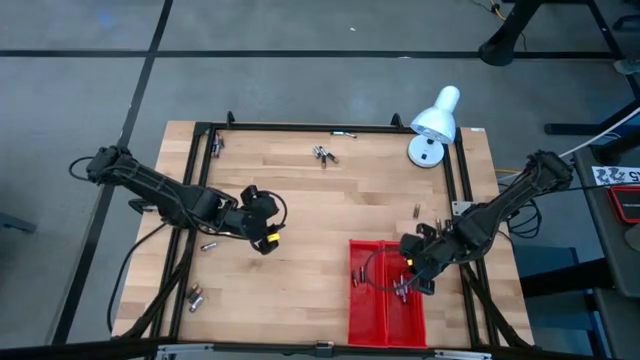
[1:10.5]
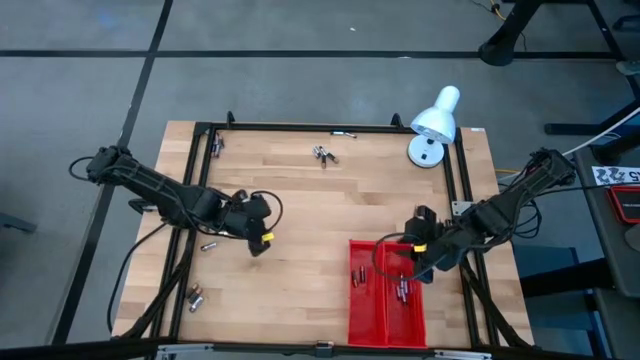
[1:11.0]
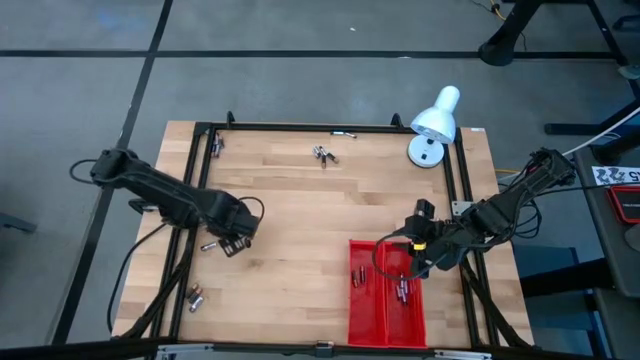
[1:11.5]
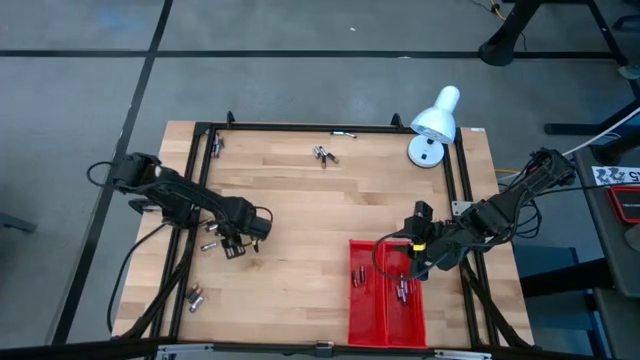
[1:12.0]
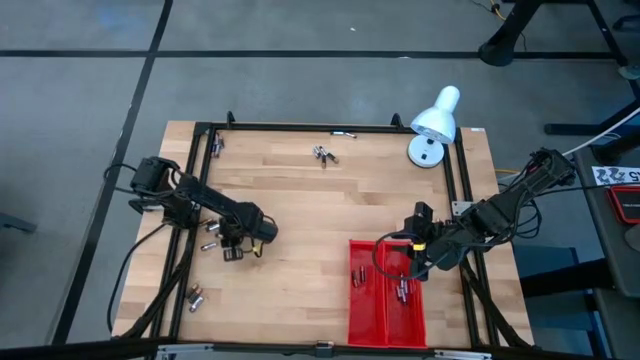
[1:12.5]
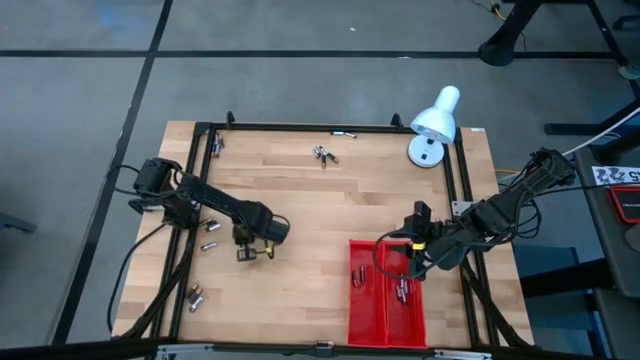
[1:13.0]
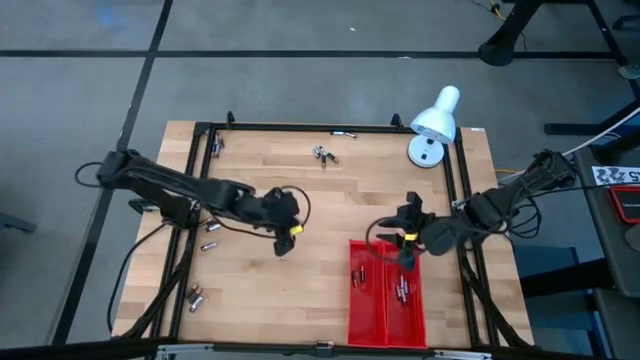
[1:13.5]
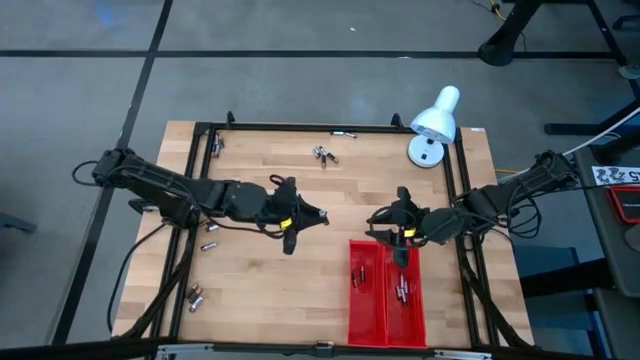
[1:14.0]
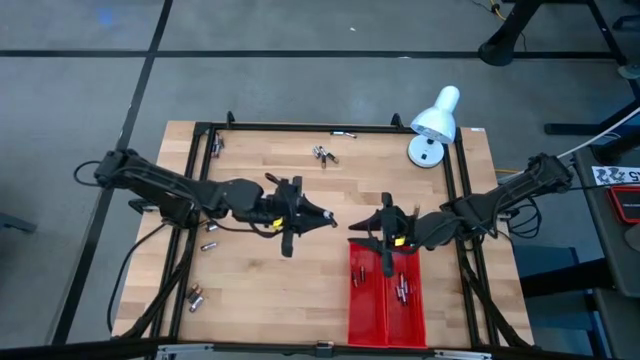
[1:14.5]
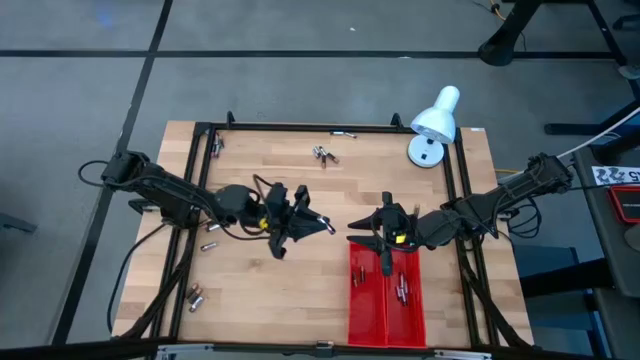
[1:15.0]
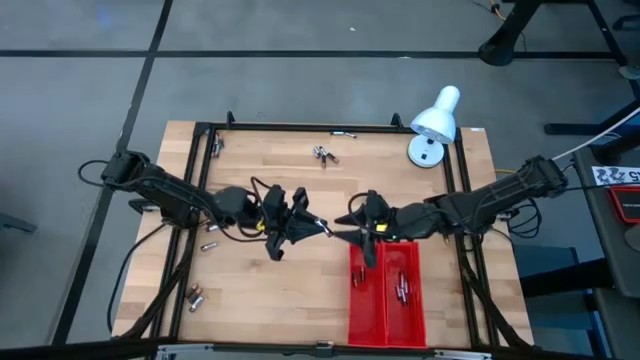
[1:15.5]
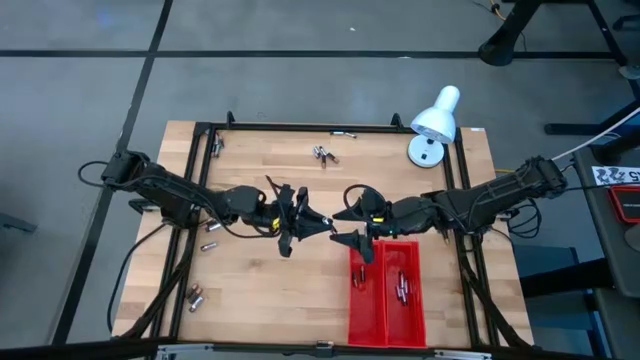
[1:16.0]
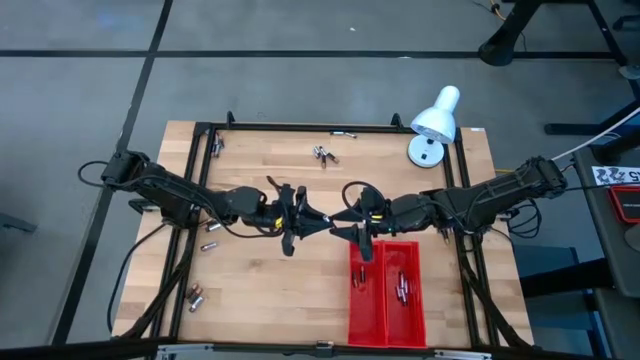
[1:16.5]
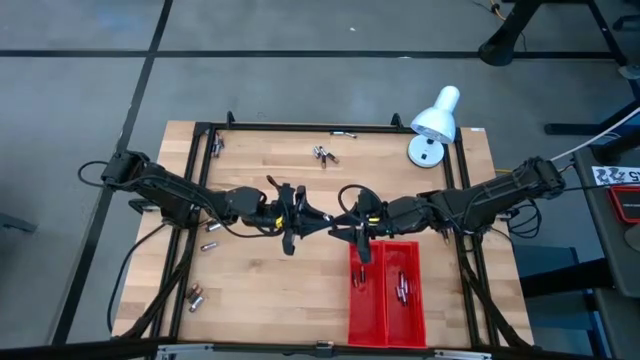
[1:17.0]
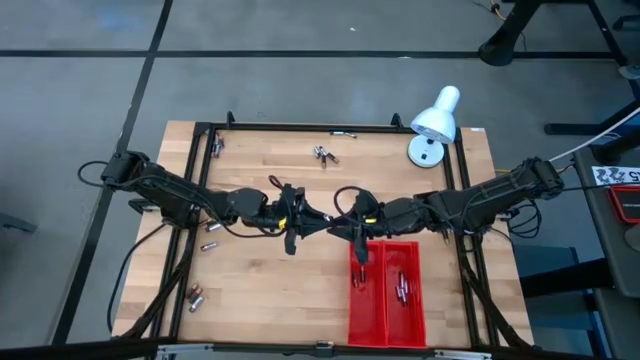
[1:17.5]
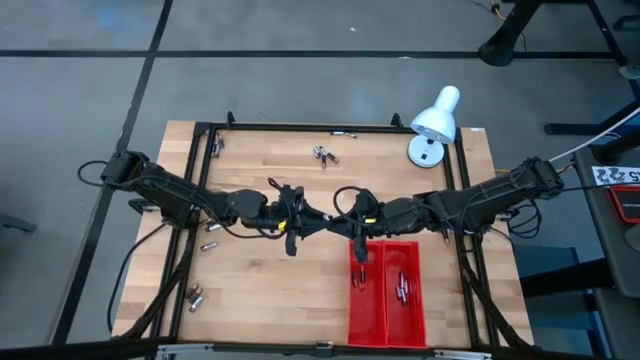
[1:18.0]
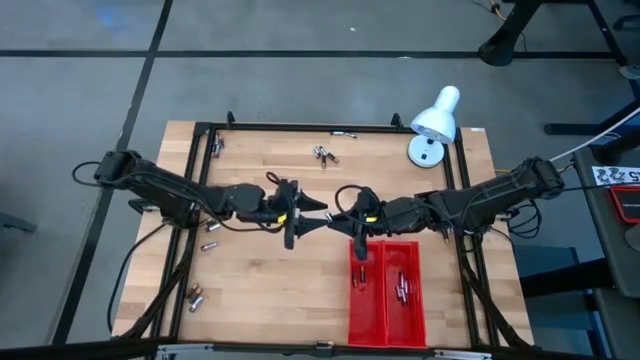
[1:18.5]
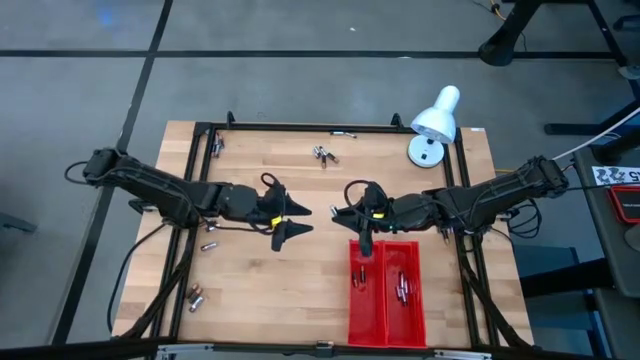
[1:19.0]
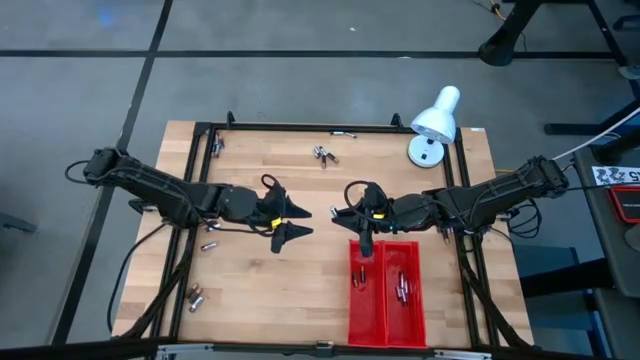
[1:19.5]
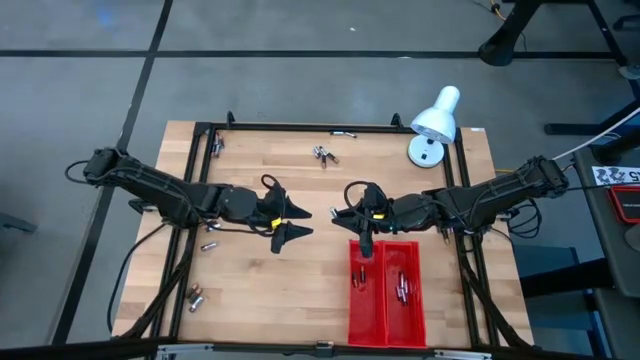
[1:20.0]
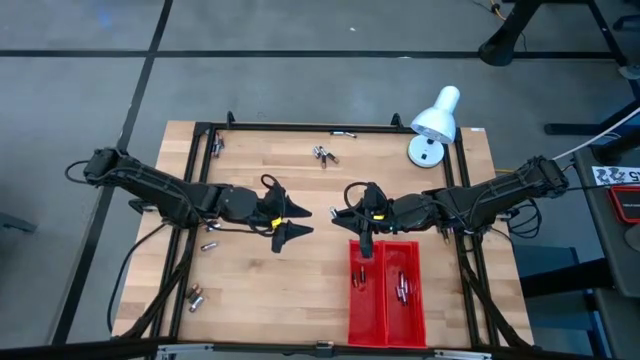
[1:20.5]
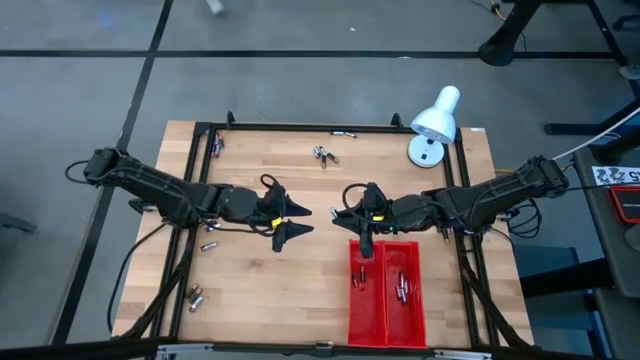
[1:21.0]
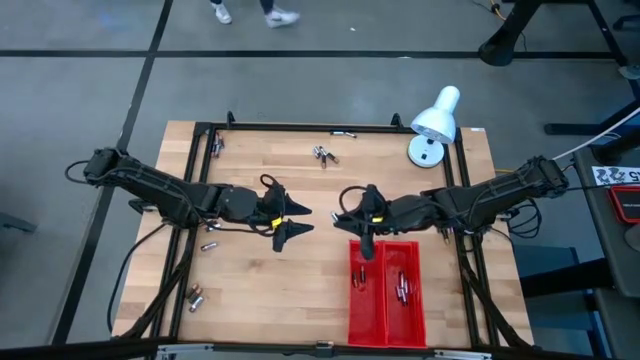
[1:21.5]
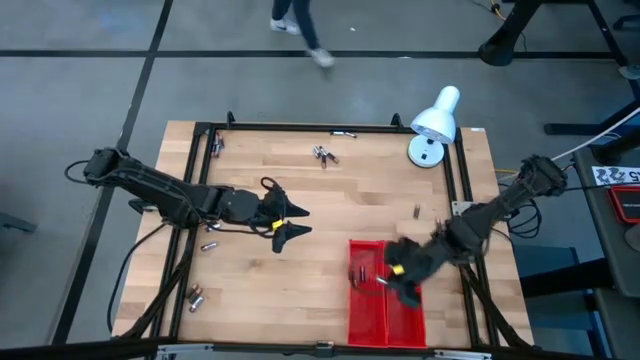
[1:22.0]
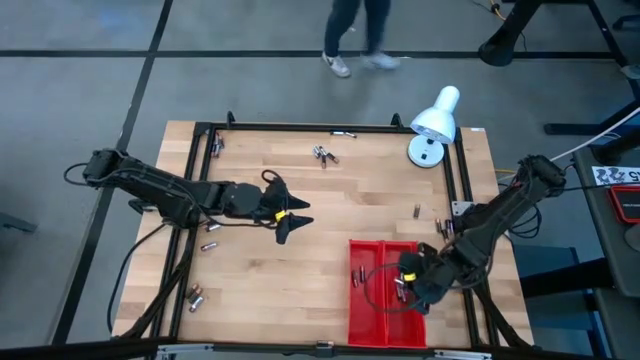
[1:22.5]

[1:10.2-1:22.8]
Task: Sort batteries
Put the silver battery into the right red bin

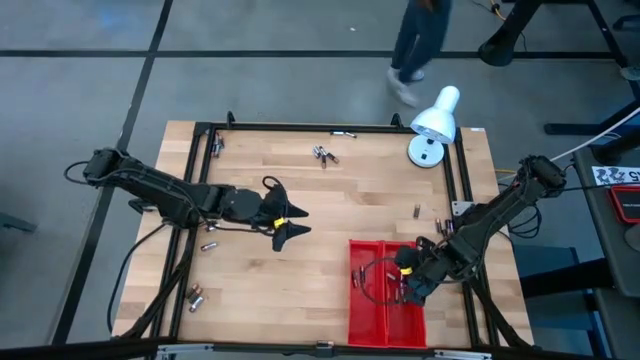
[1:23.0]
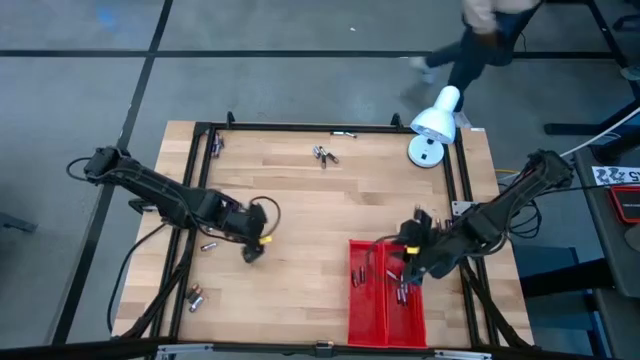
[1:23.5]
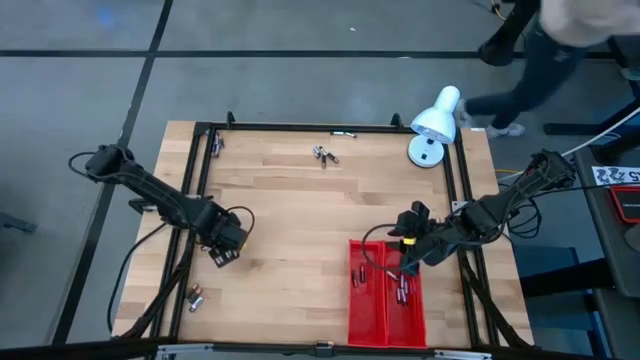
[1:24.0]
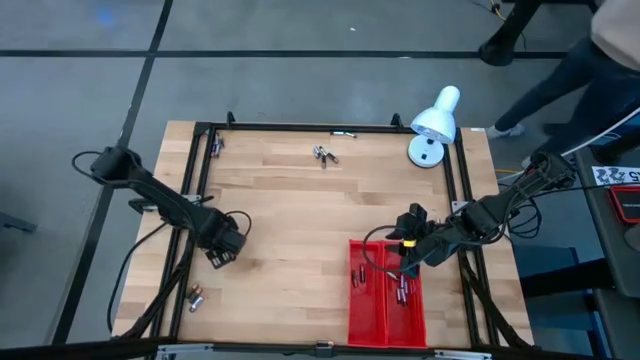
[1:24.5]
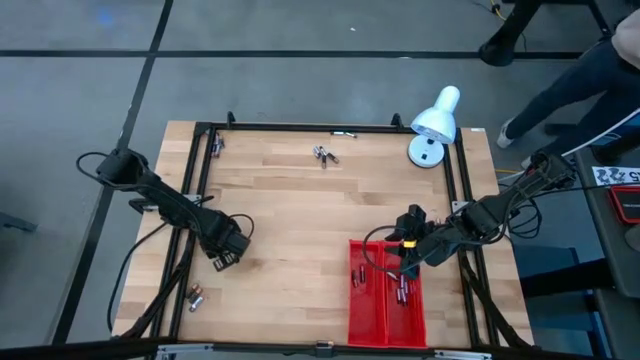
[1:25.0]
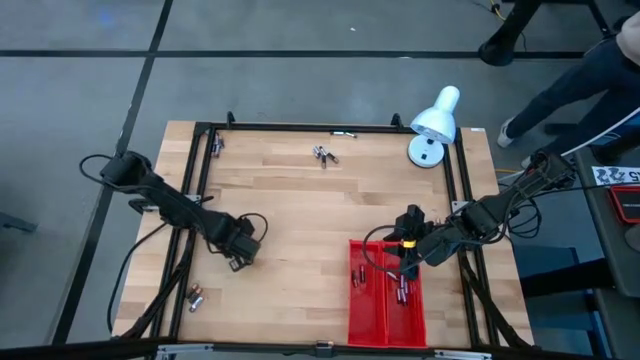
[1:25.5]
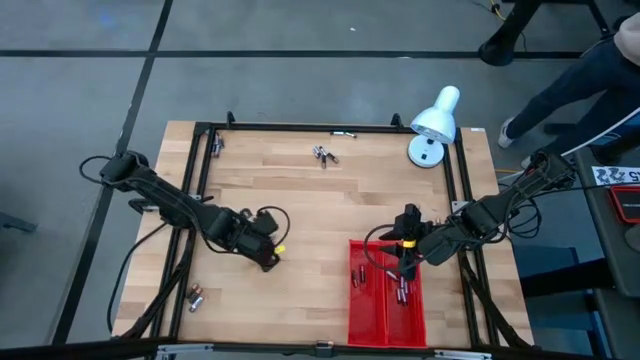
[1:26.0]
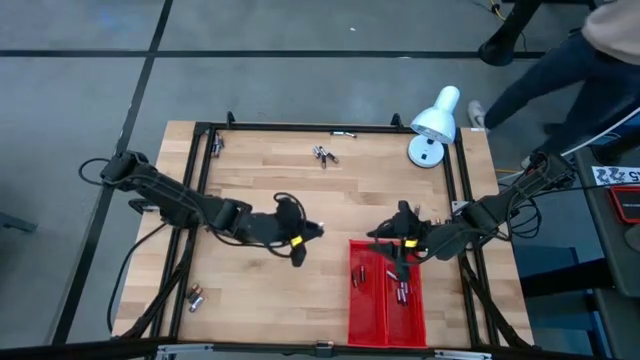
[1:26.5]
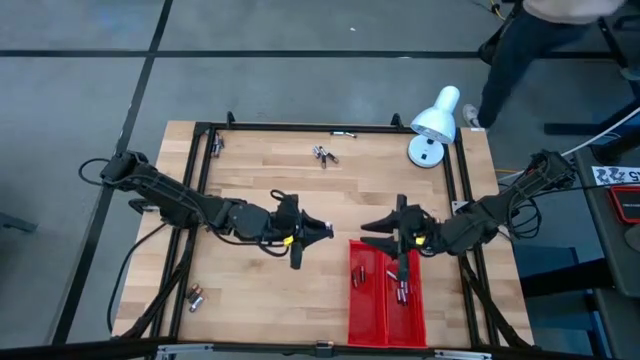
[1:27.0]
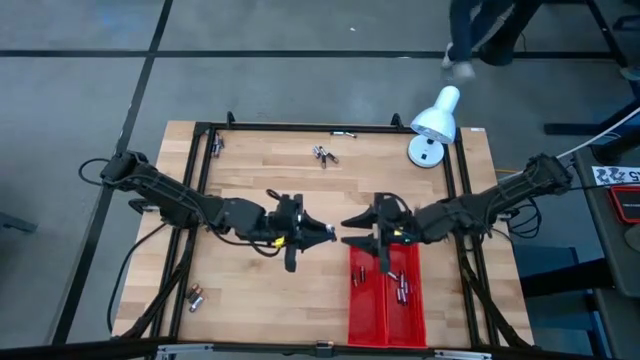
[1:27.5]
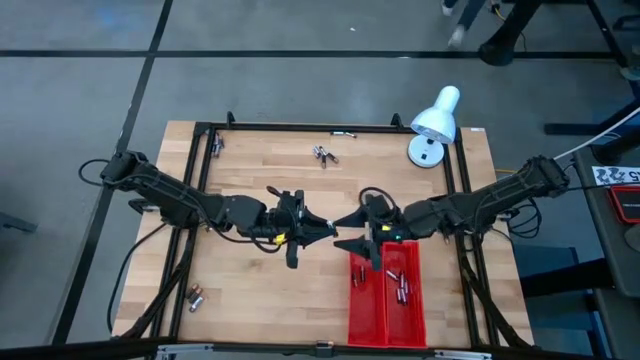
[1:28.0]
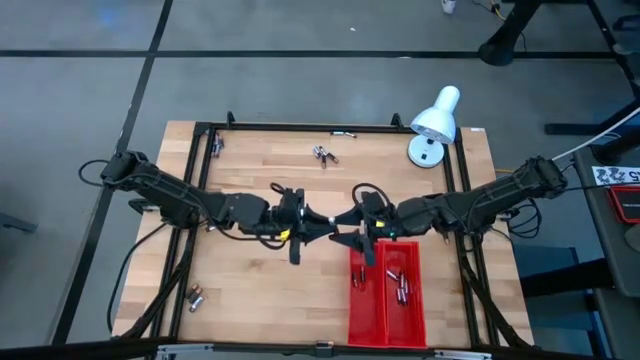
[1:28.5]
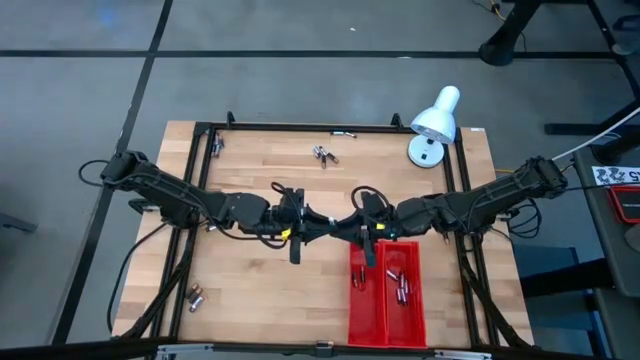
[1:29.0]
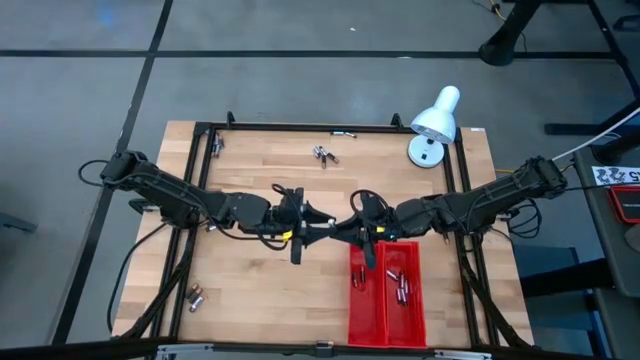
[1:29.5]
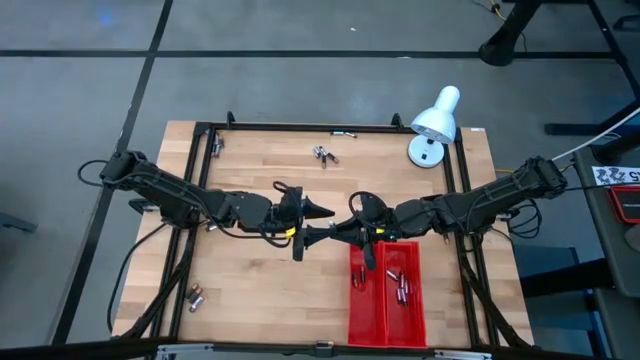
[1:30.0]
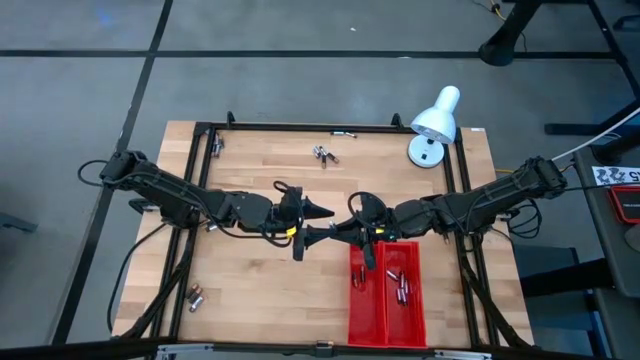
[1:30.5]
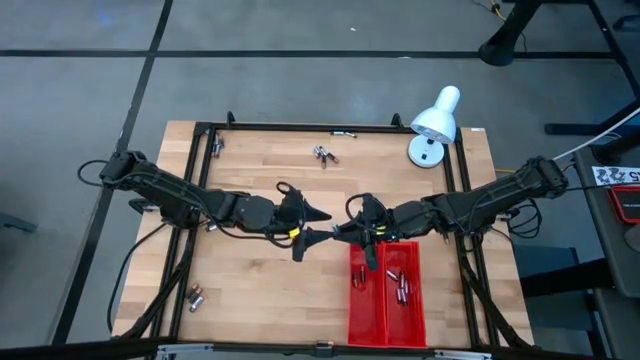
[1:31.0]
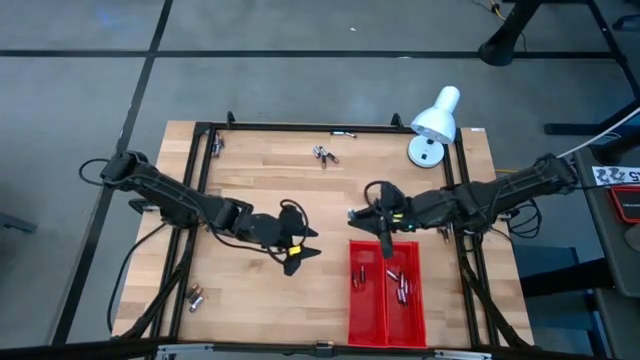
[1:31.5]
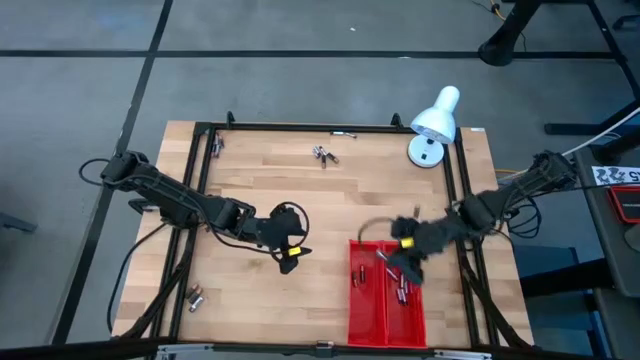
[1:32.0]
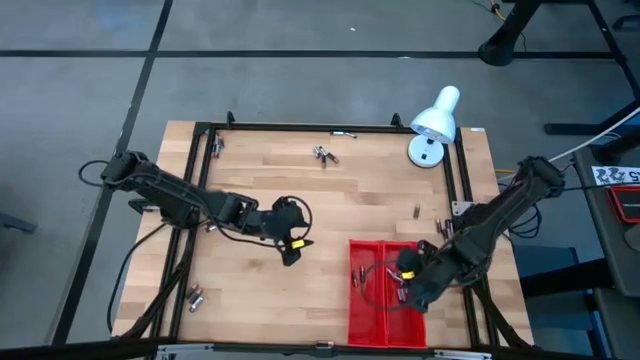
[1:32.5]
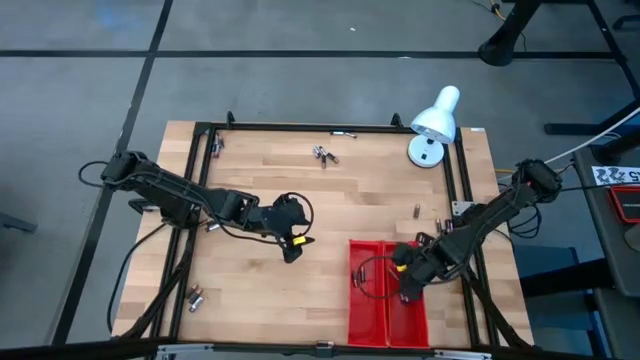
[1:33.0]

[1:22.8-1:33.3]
Put the silver battery into the right red bin

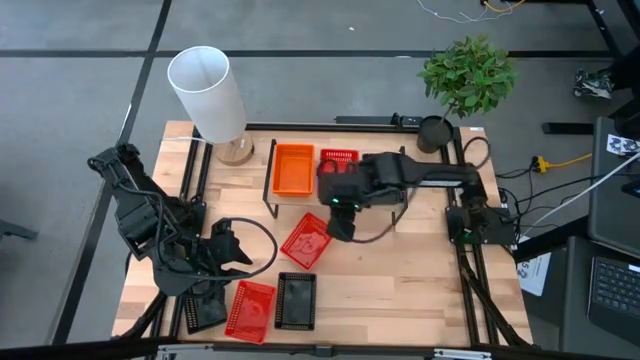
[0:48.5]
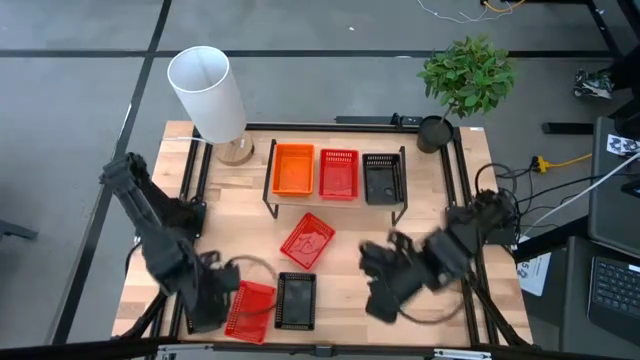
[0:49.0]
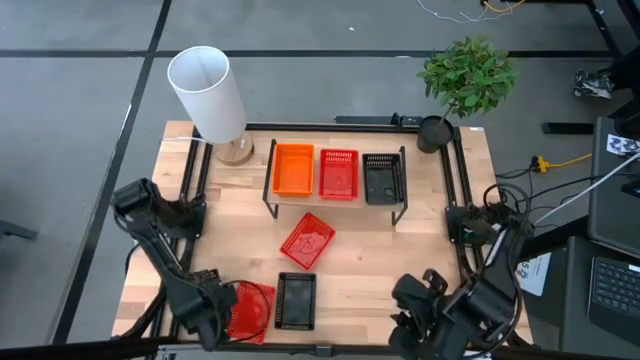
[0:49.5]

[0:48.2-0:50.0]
Task: Stack baskets on shelf by color
Adjust the bins
